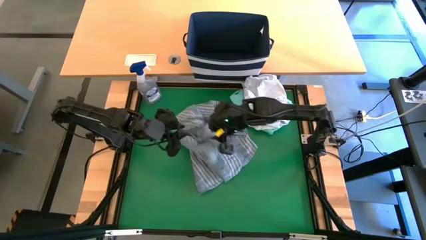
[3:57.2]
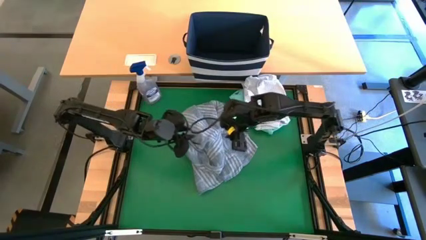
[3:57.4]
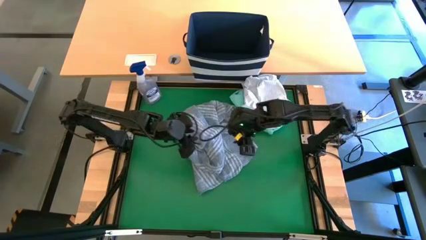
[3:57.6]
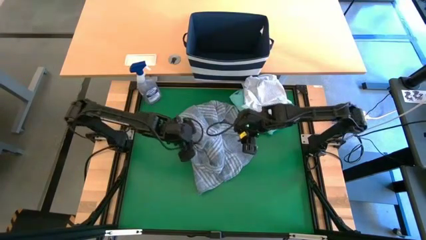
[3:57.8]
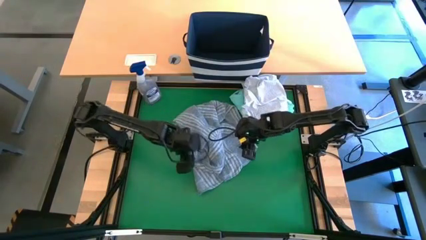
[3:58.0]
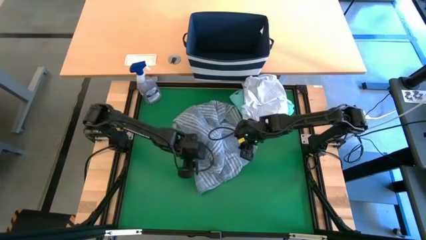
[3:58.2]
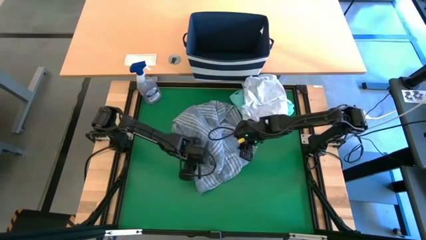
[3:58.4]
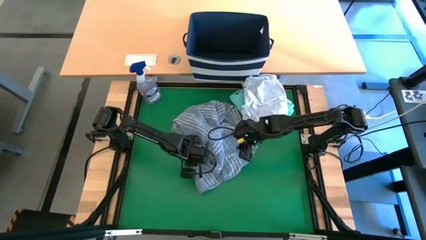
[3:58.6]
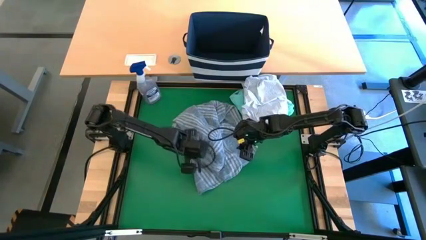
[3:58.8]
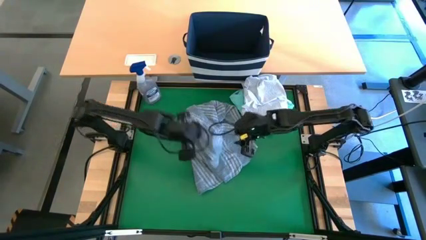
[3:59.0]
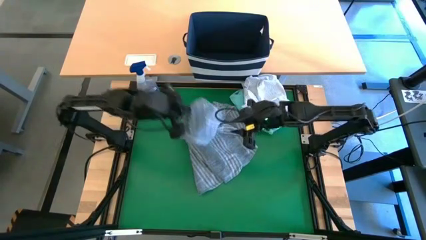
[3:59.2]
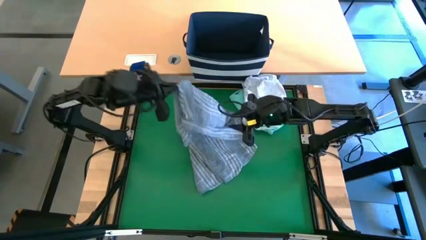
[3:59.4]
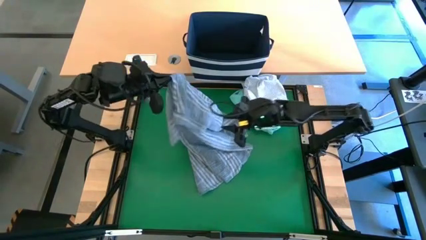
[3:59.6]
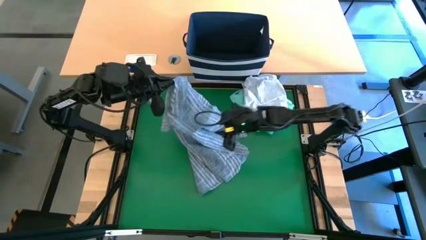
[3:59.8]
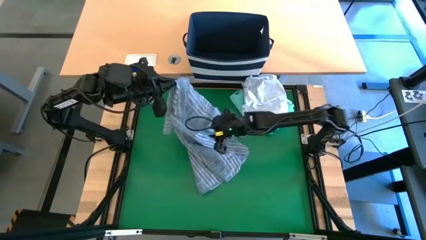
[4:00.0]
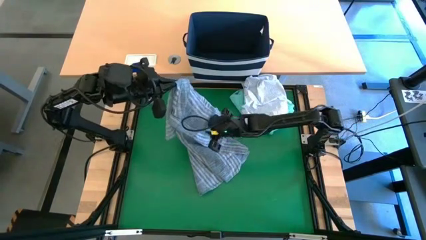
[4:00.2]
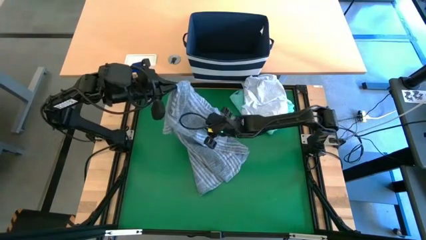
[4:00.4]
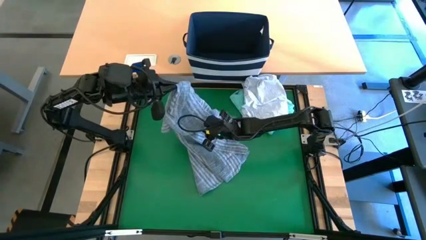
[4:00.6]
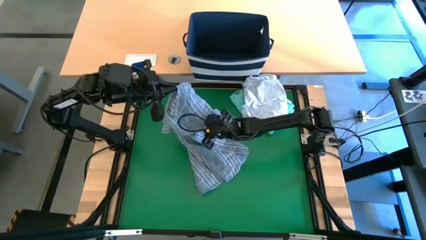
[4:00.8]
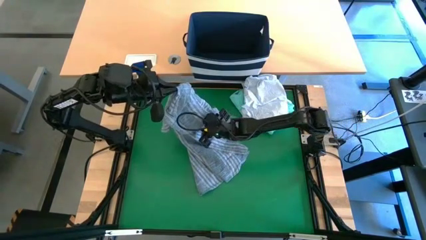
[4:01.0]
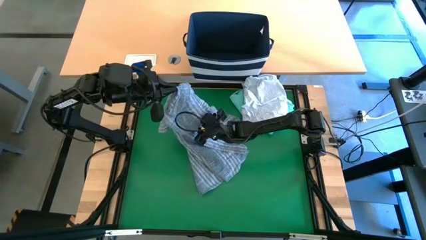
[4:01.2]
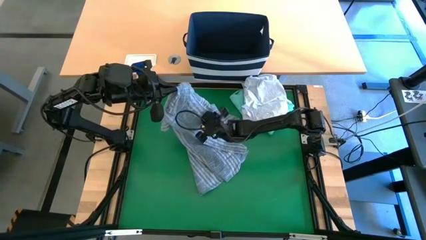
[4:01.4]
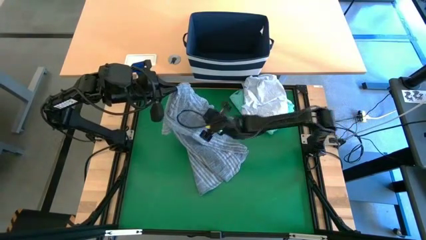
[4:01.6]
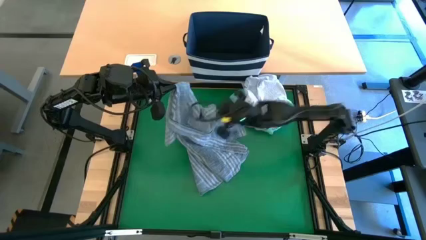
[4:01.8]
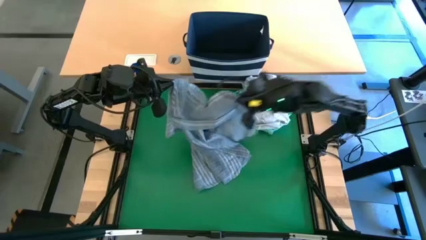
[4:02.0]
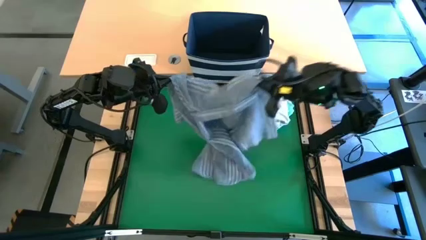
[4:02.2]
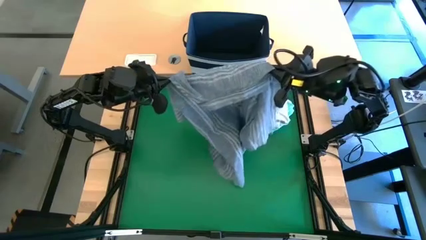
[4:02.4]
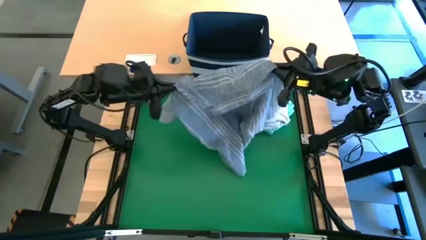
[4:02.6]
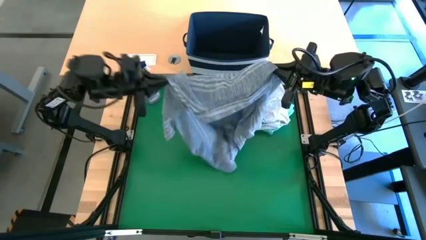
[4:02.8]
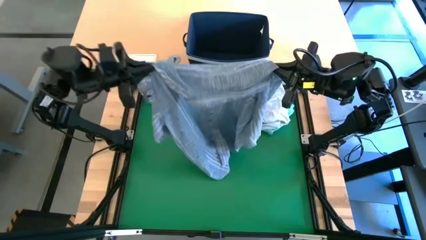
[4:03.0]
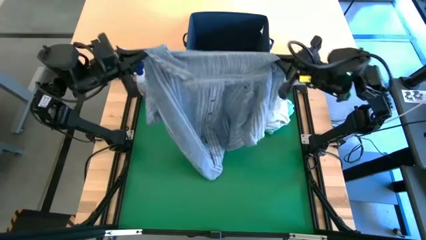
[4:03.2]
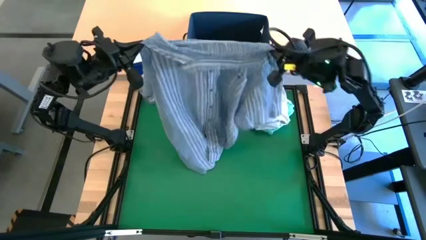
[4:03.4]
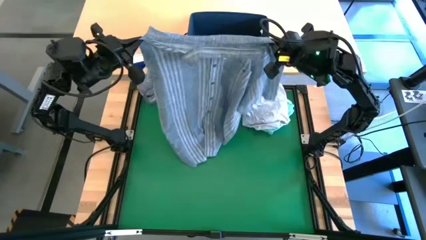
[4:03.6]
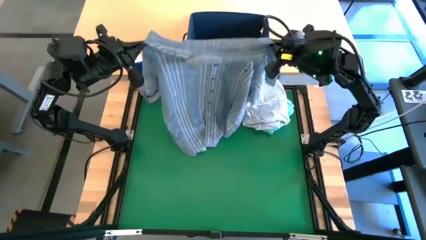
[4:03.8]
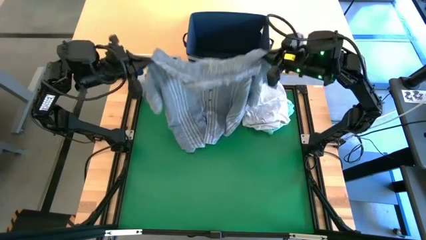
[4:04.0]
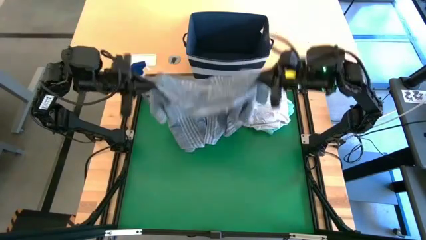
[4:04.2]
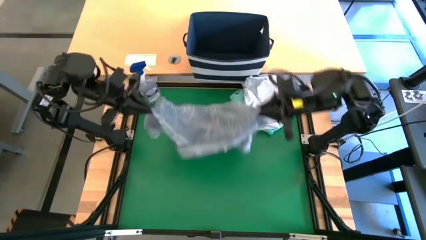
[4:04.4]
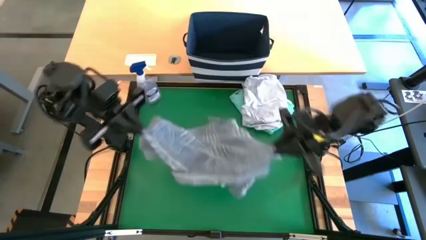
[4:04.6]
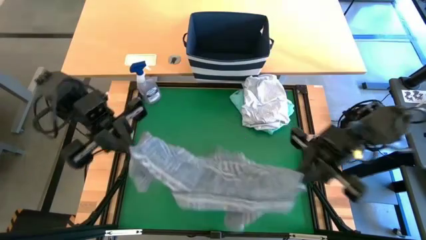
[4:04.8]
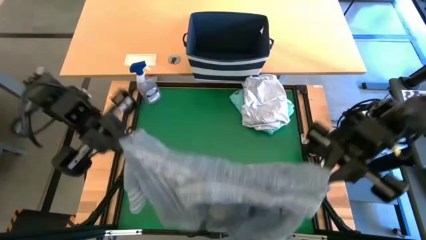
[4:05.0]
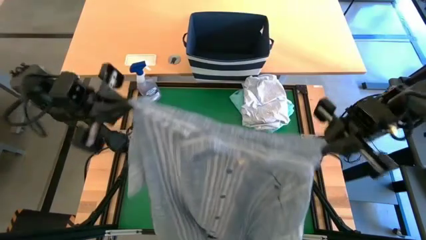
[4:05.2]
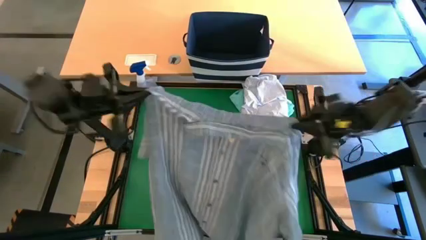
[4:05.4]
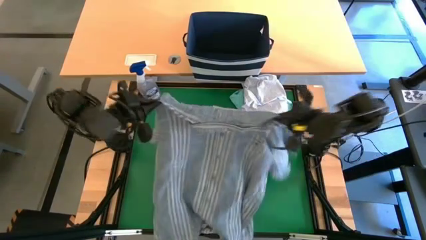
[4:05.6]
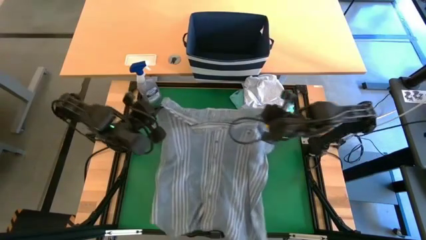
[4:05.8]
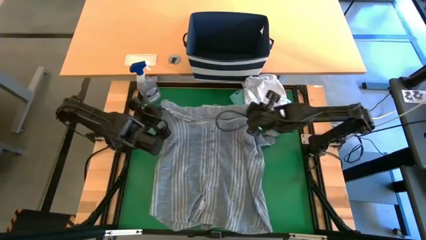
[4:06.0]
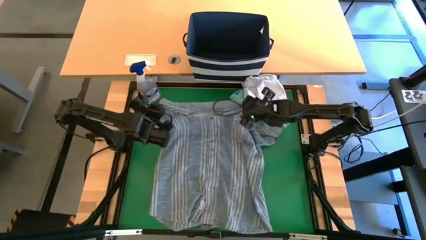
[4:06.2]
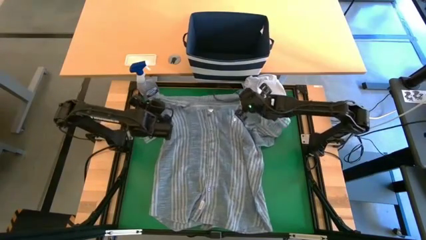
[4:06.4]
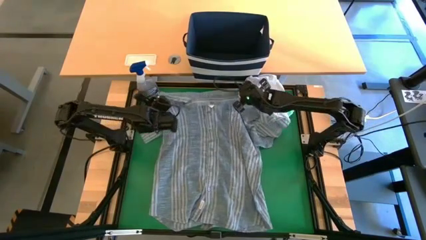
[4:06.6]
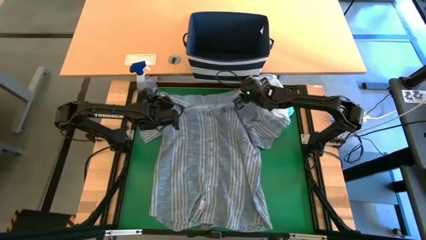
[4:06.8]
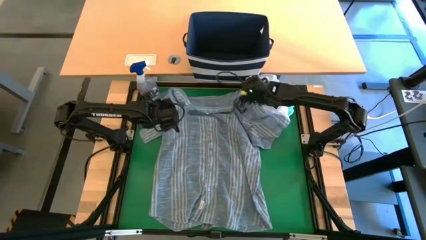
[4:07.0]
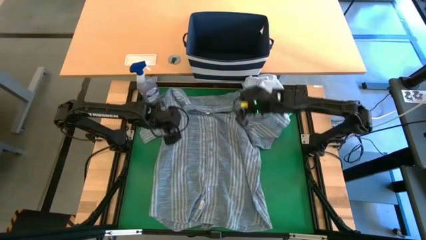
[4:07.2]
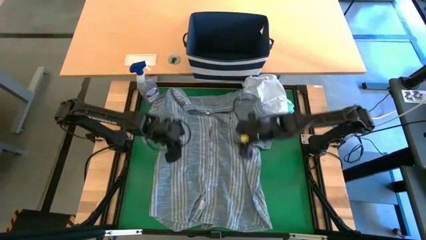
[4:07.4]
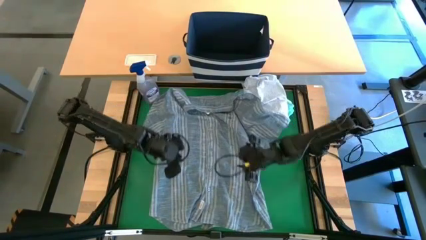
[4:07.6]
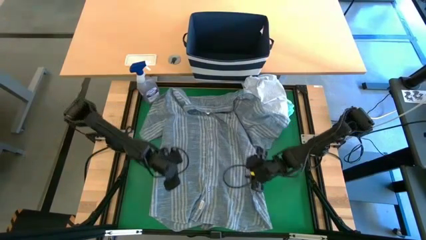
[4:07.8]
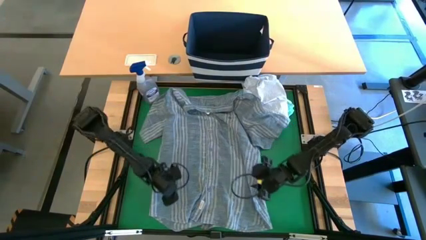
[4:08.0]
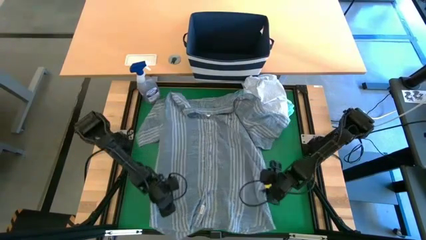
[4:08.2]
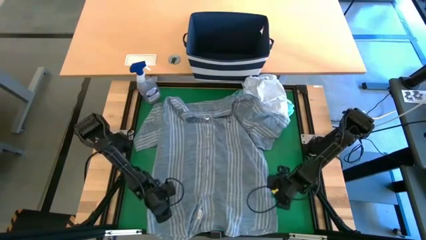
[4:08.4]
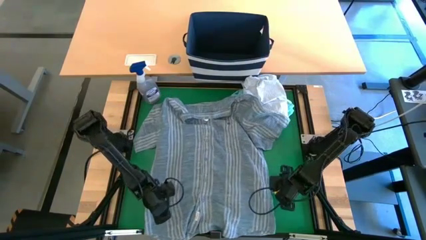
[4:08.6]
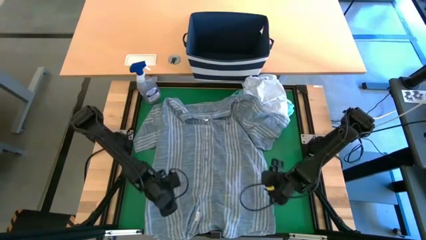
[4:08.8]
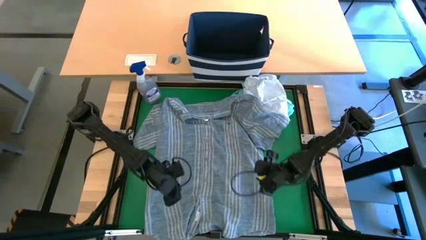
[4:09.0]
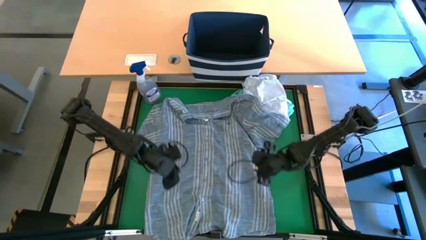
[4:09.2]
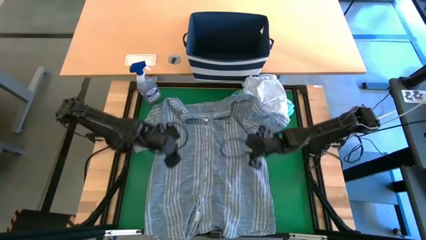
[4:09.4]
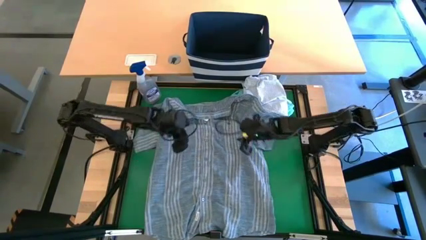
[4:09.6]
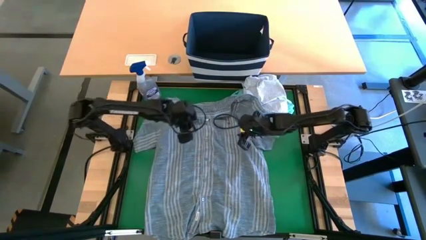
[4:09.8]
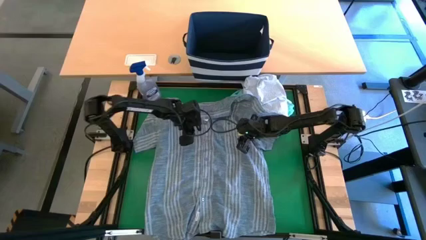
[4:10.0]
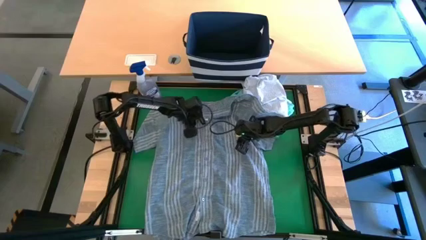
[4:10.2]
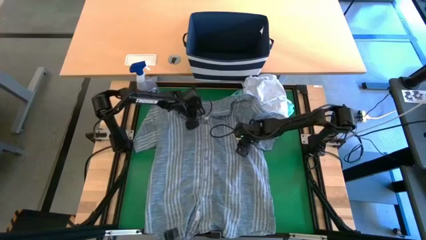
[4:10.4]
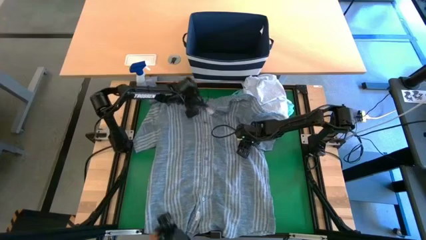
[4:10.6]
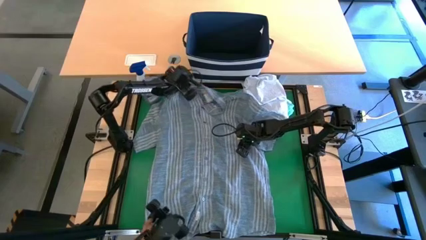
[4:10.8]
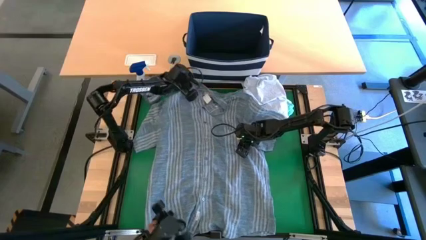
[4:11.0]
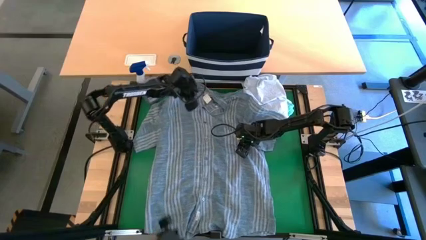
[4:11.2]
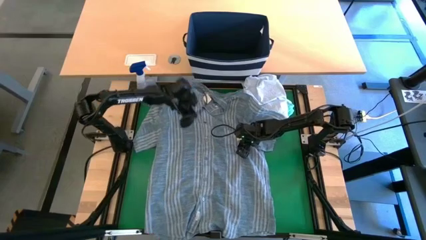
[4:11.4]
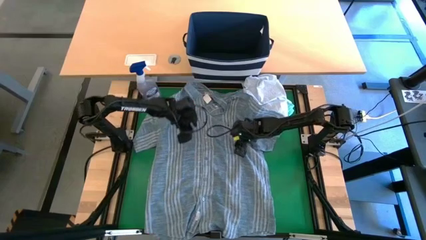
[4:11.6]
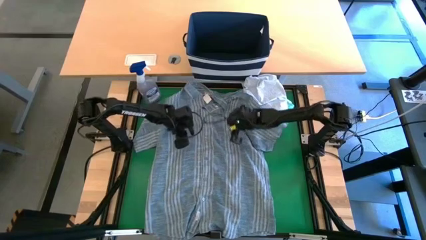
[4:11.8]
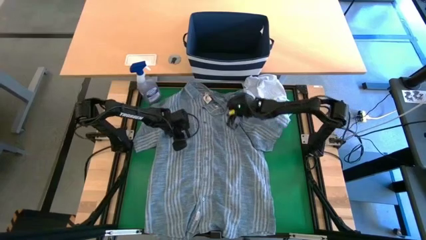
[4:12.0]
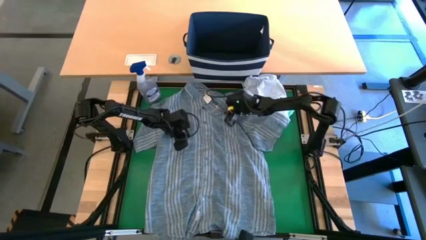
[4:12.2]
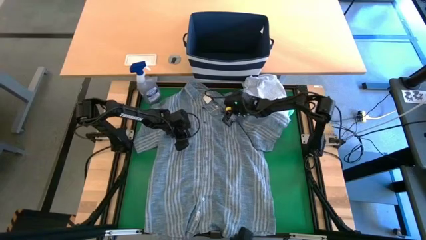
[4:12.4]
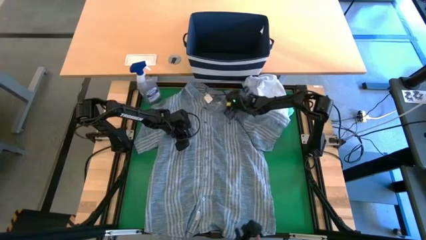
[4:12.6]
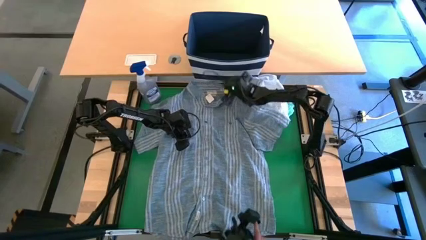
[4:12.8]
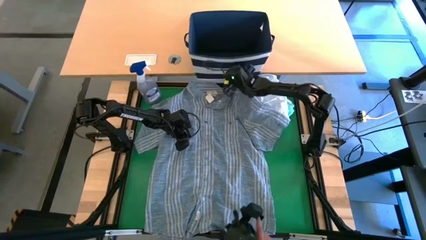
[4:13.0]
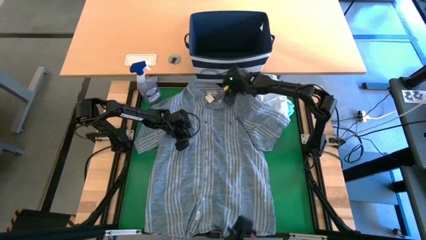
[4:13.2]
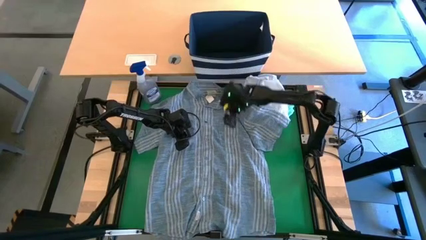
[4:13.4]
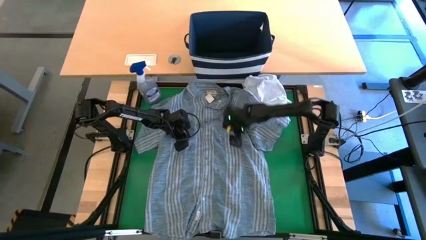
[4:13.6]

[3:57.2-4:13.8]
Task: Fold laundry
Fold the blue polo shirt

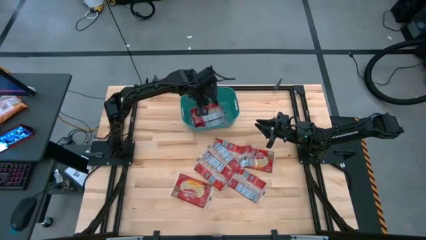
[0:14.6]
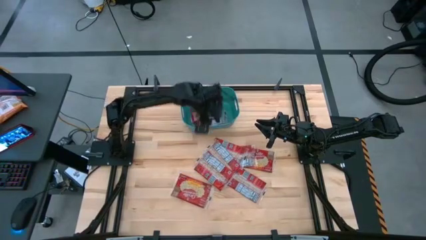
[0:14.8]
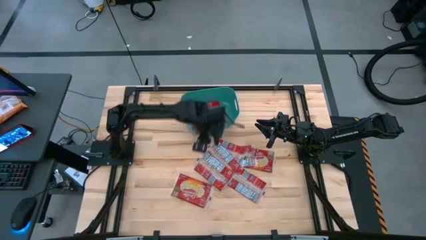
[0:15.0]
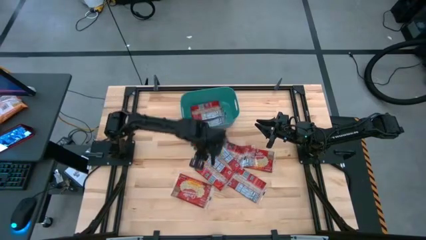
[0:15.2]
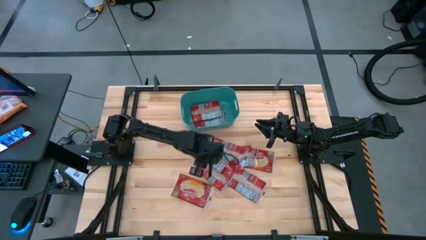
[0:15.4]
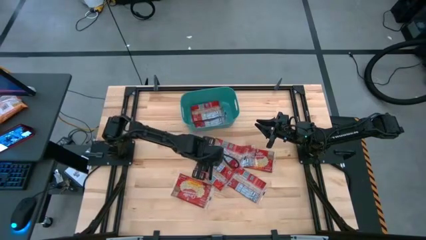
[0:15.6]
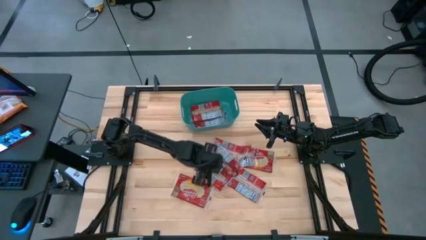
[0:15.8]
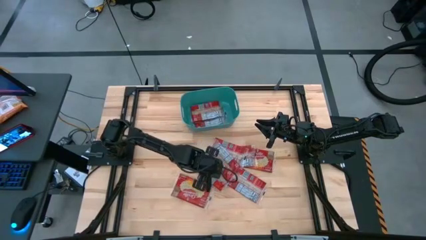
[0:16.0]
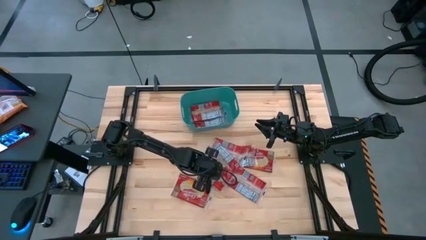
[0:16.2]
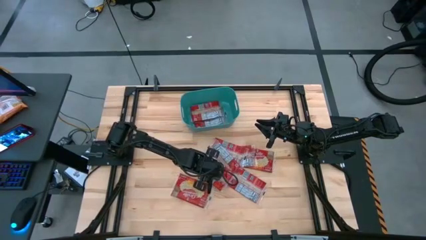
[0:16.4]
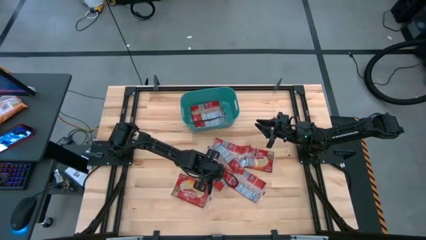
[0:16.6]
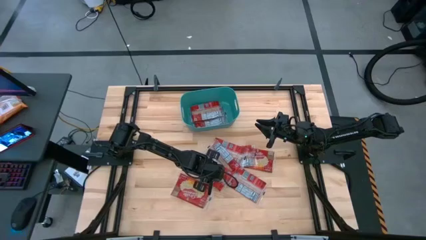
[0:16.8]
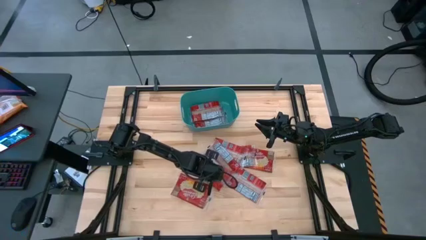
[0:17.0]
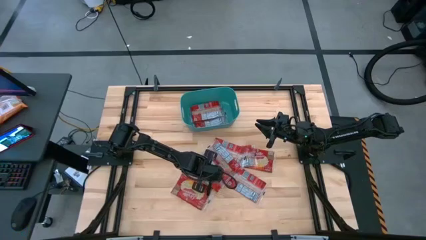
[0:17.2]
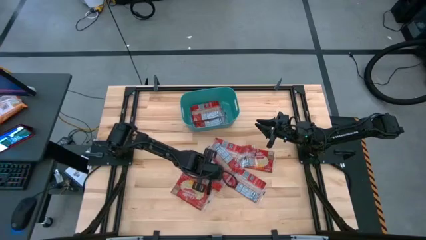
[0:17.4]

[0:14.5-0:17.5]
Task: Sort popcorn bags into baskets
Put the red popcorn bag into the blue bin
